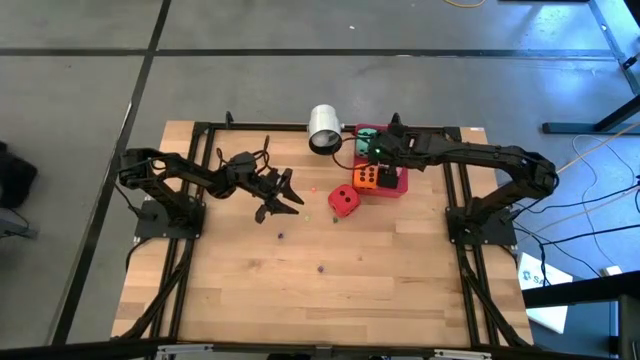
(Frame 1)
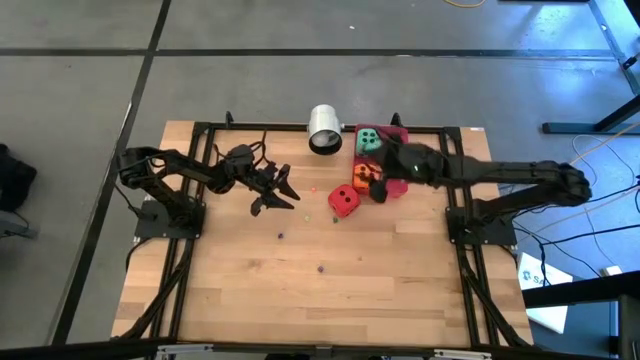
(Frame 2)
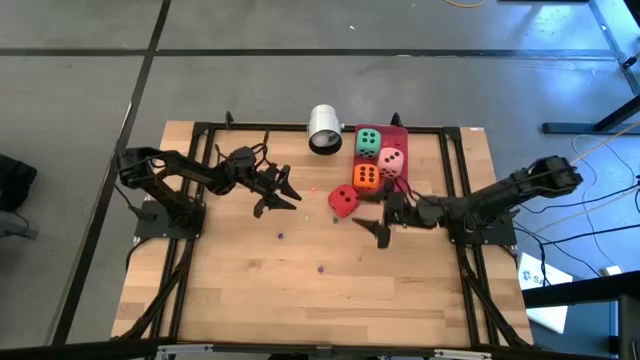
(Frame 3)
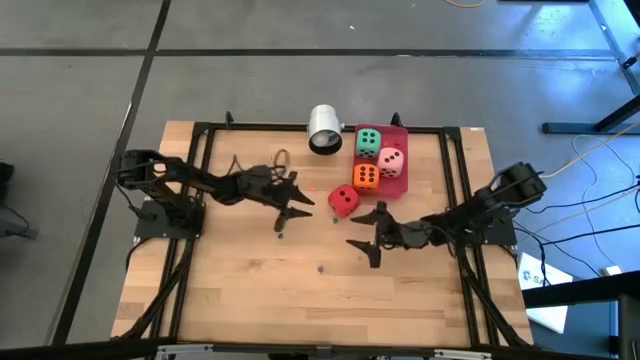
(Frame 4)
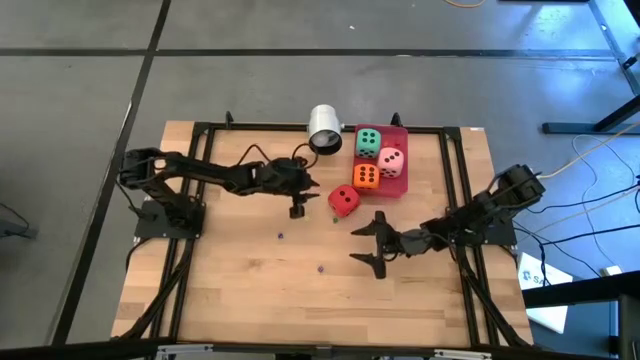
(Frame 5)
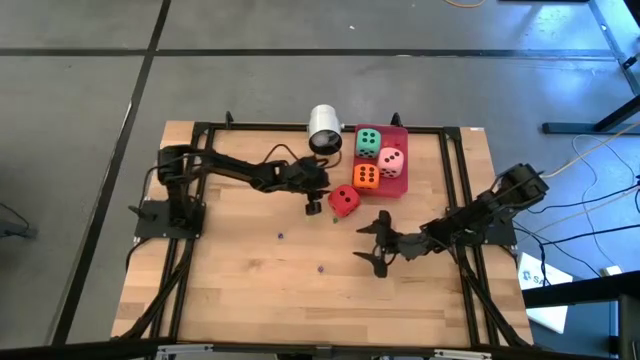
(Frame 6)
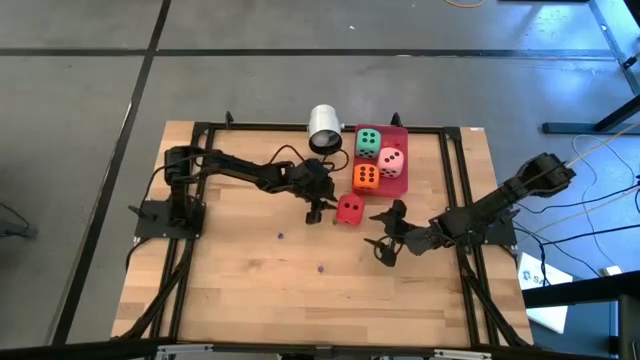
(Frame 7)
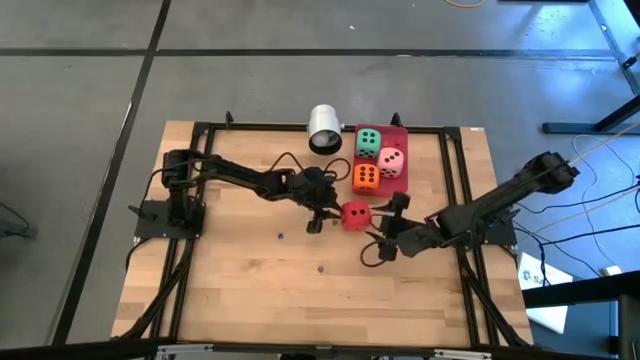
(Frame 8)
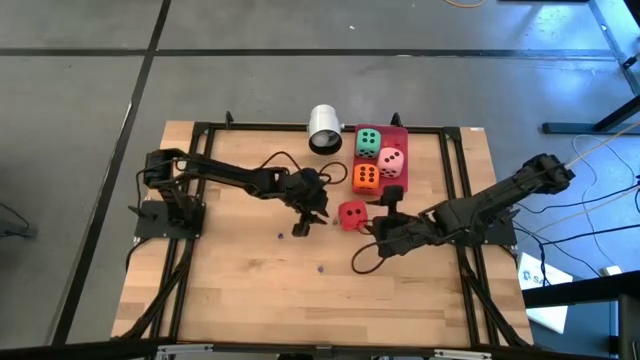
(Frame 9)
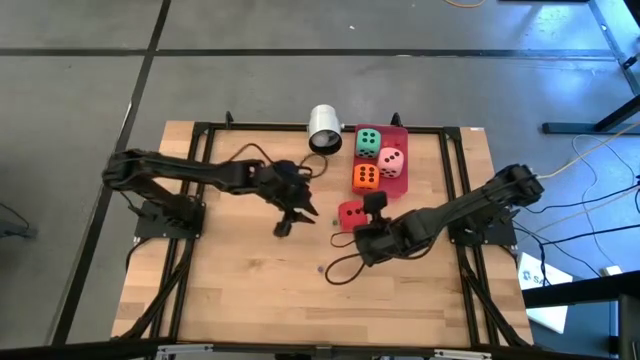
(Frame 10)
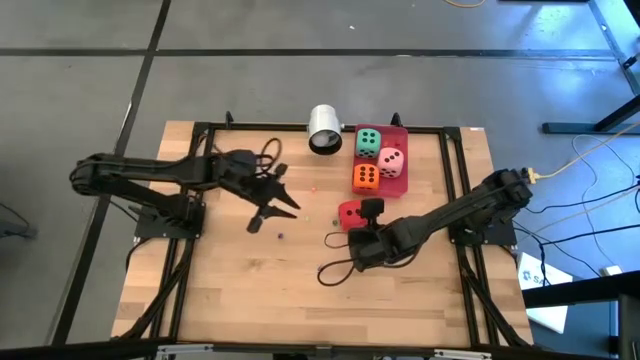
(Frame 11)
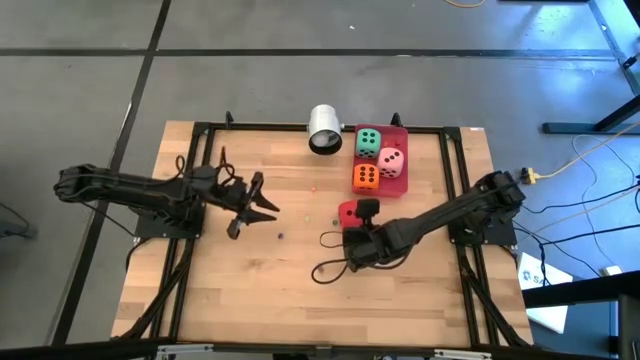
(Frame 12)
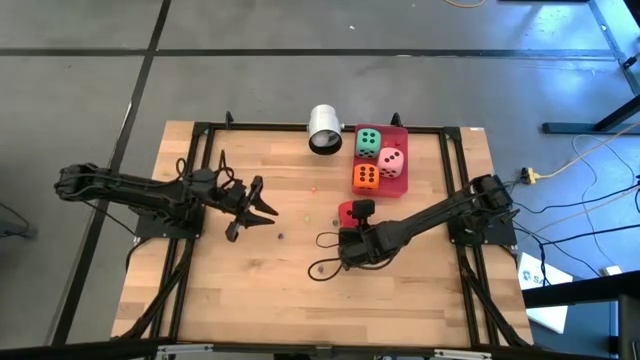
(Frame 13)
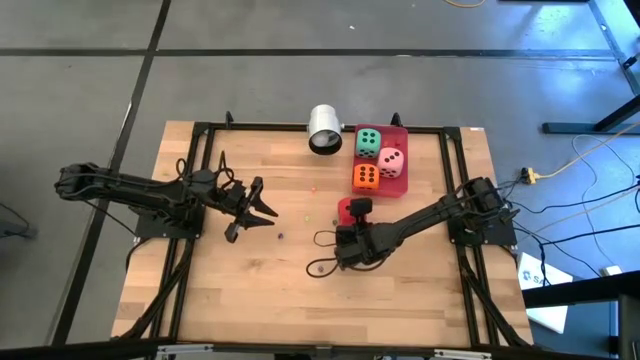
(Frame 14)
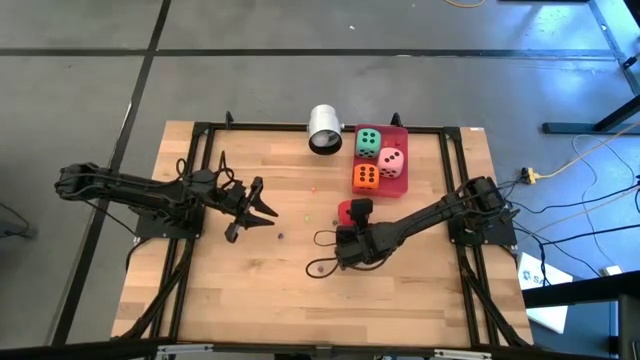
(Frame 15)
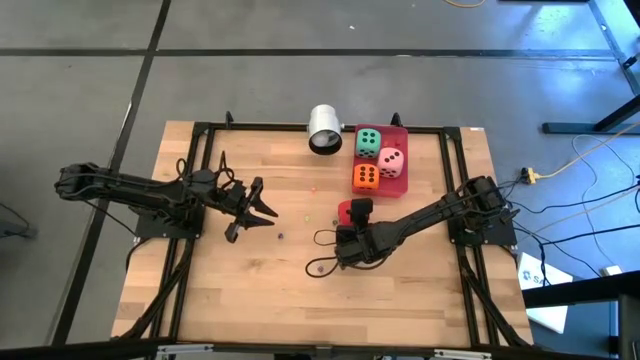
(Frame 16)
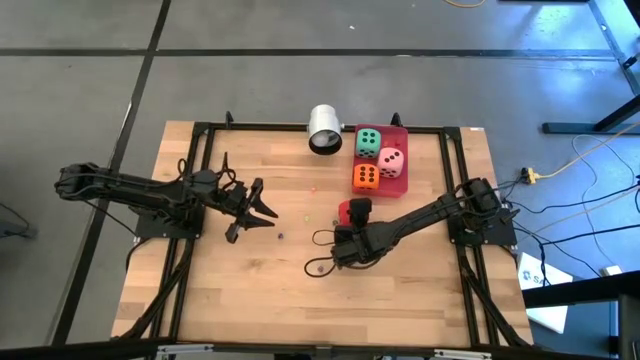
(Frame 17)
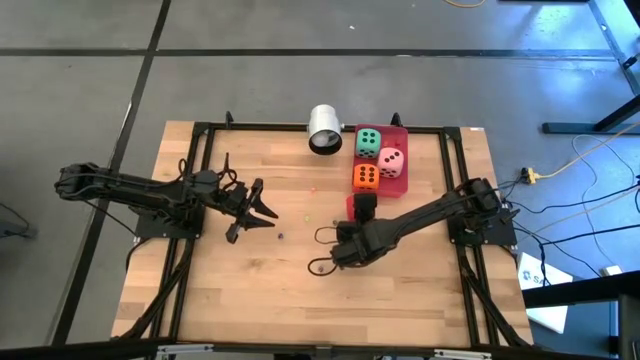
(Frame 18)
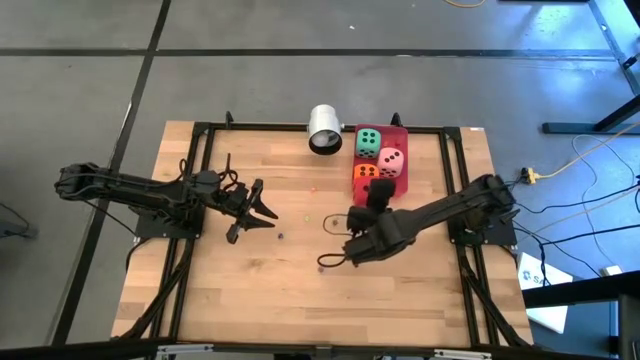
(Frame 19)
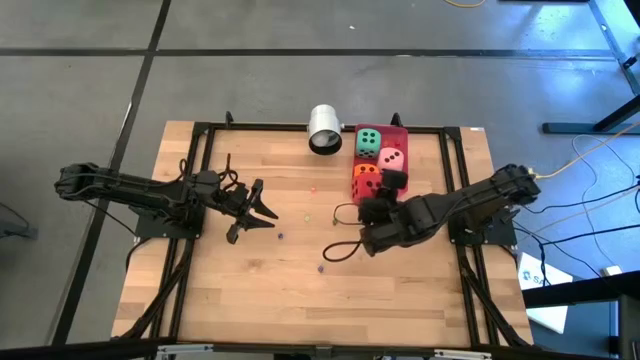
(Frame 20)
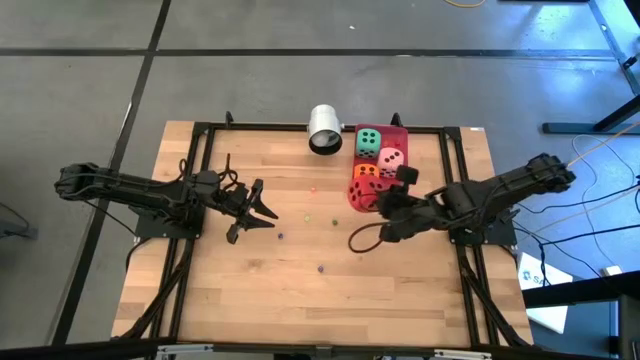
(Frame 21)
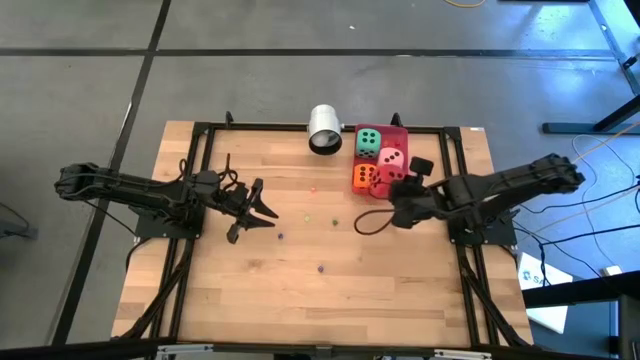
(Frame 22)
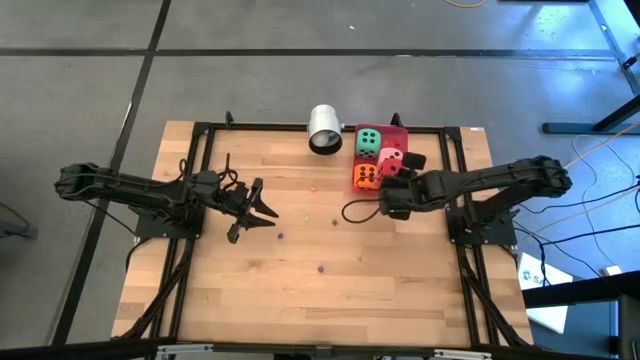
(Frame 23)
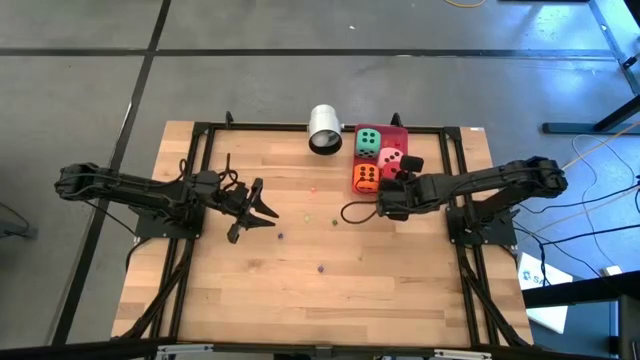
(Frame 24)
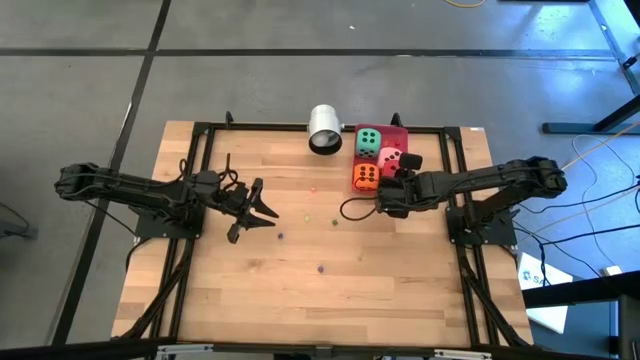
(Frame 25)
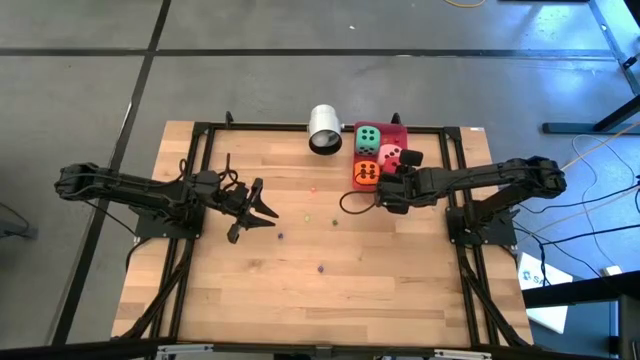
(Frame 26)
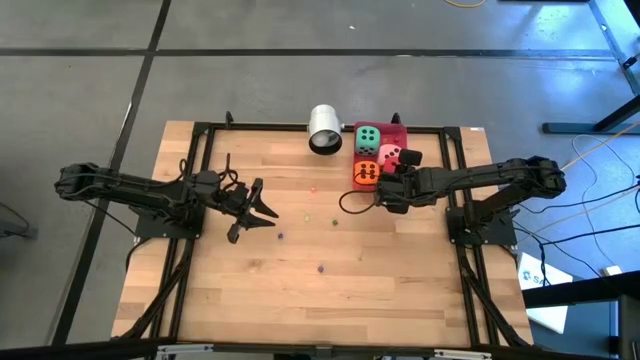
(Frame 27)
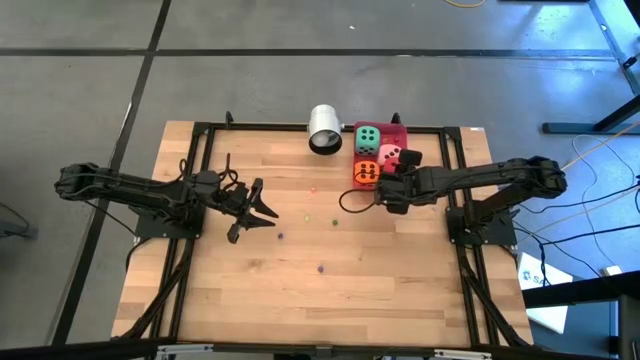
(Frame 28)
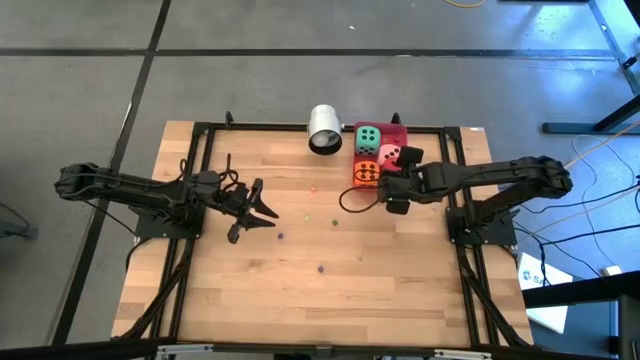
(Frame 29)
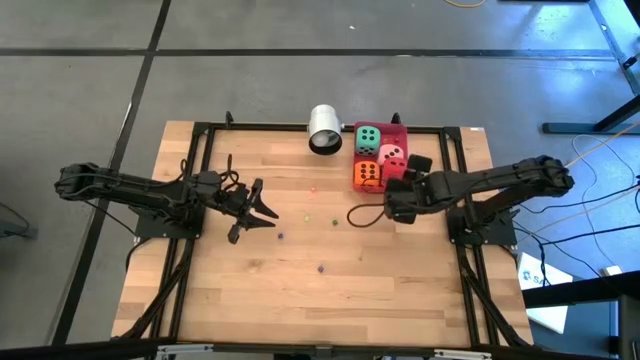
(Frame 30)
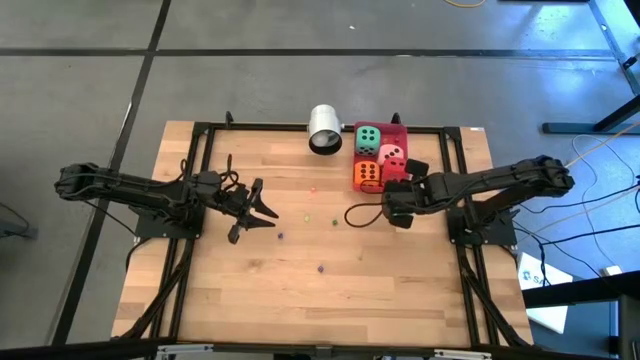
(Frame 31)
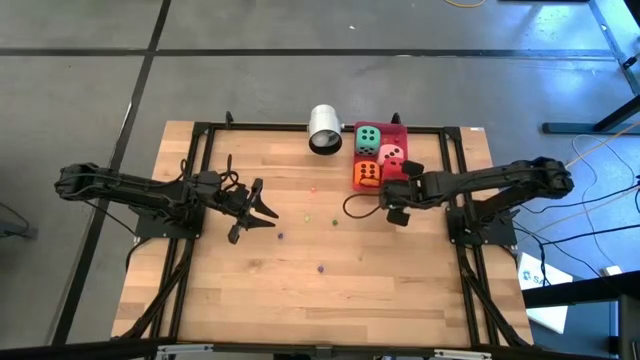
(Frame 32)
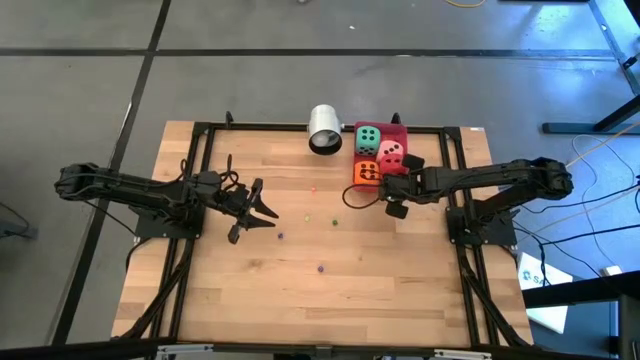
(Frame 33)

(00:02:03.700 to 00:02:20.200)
Task: Pick & Place Dice
Put the big red dice into the red bin

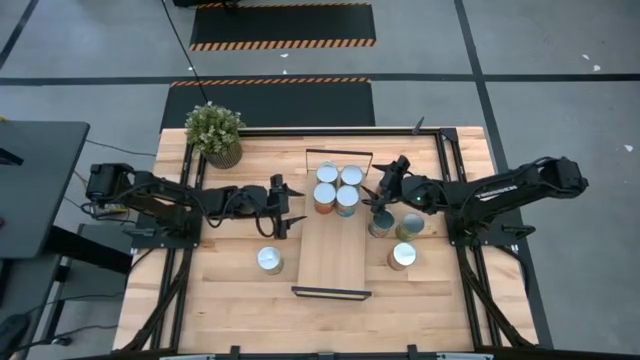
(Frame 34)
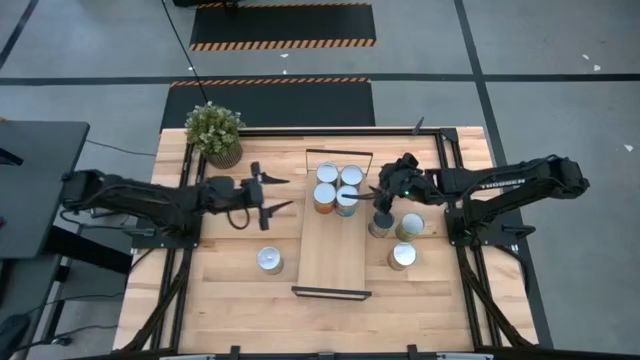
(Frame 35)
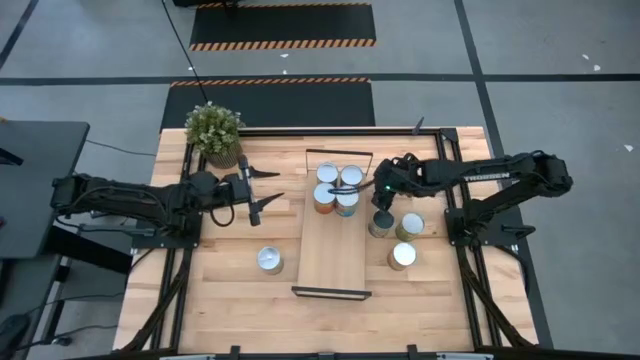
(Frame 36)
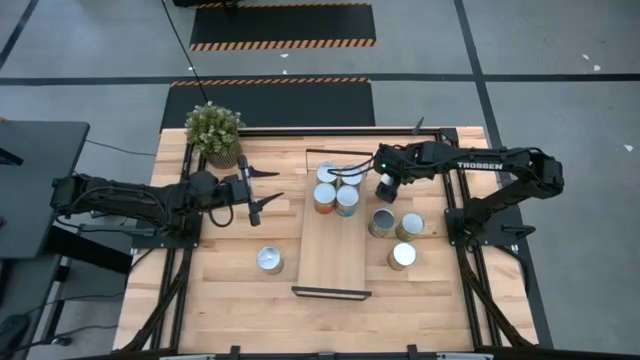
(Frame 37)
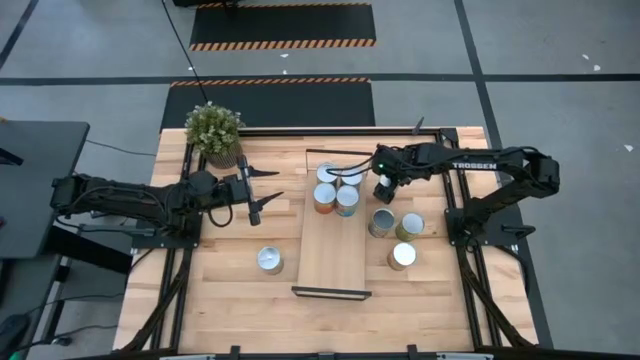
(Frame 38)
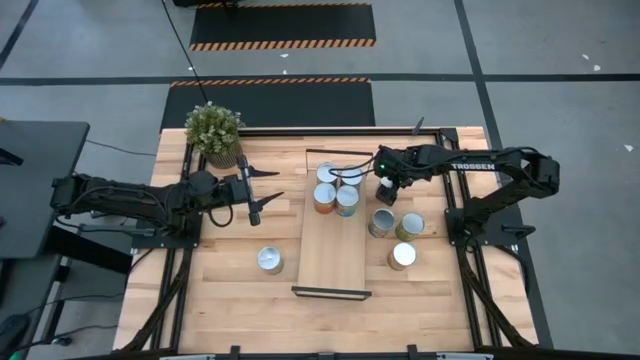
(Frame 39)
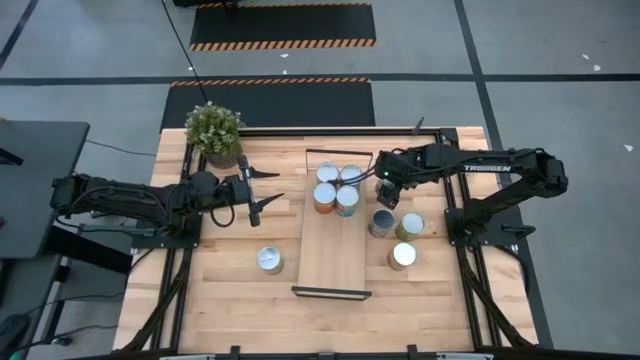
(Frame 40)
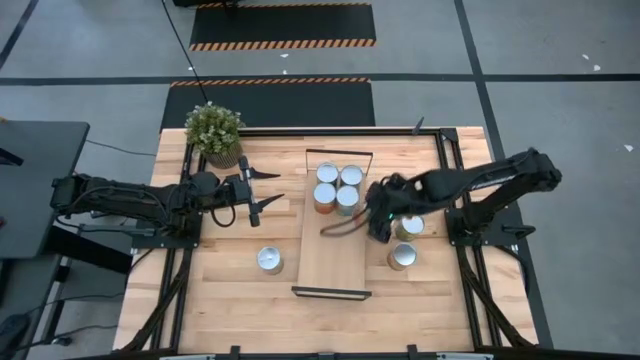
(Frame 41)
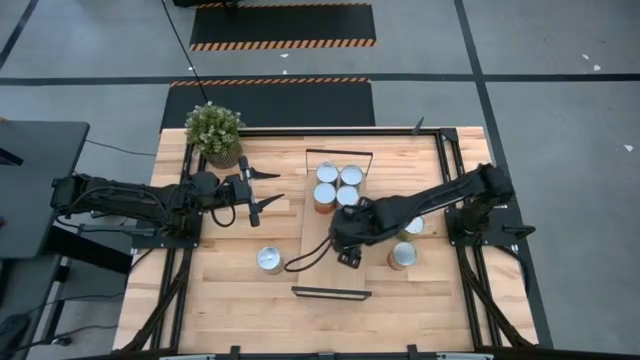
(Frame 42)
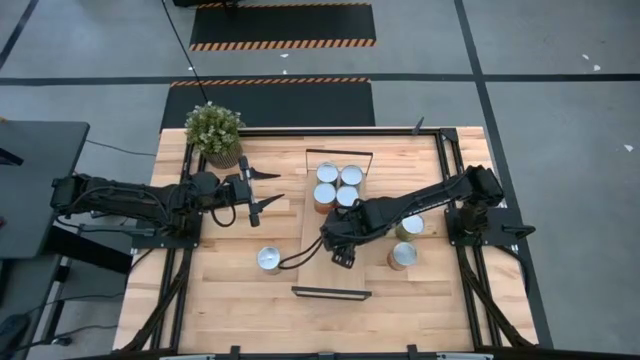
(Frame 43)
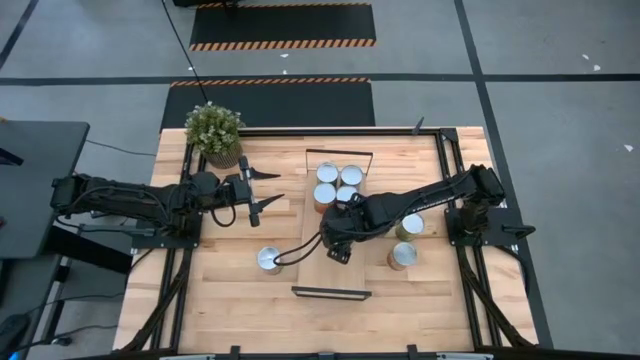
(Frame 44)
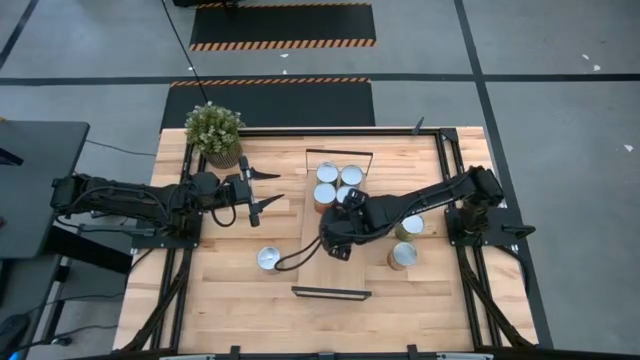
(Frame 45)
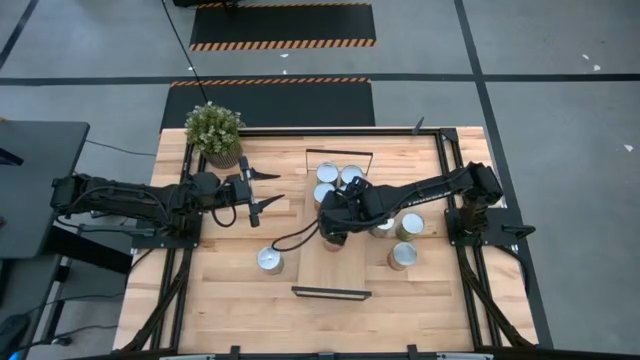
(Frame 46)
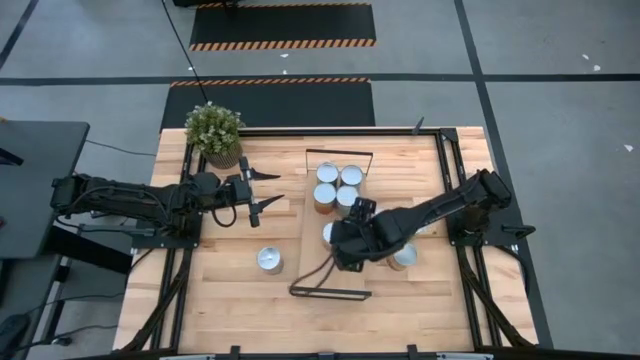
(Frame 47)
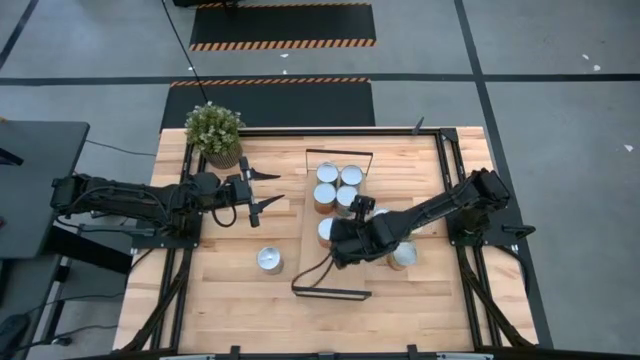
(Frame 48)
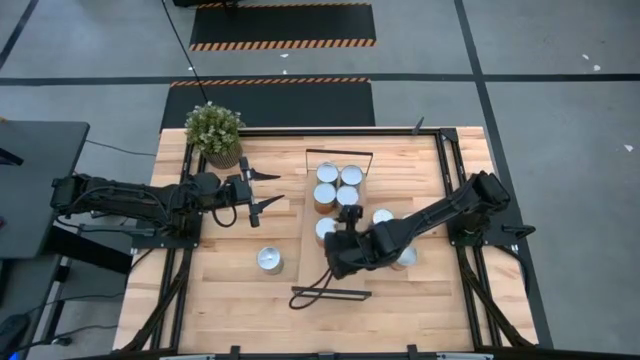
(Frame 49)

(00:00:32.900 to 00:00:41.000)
Task: Pick and place cans onto a shelf
Put the canned pineapple on the shelf
